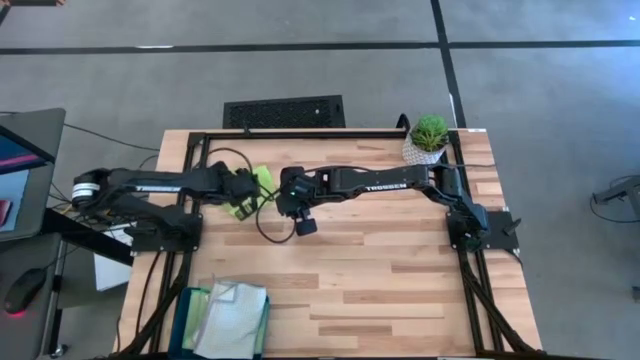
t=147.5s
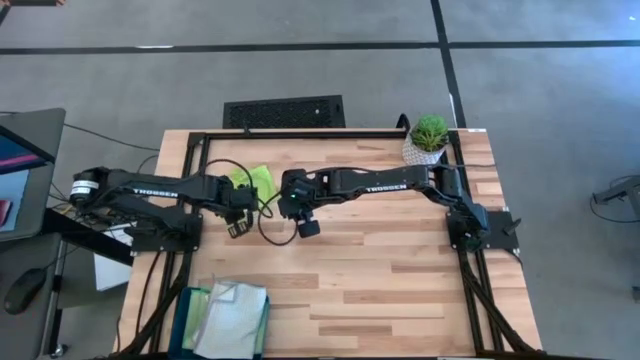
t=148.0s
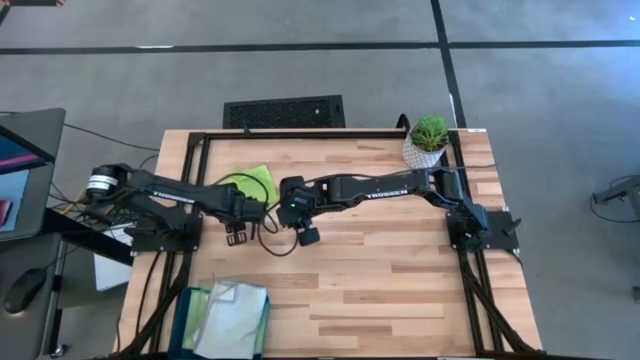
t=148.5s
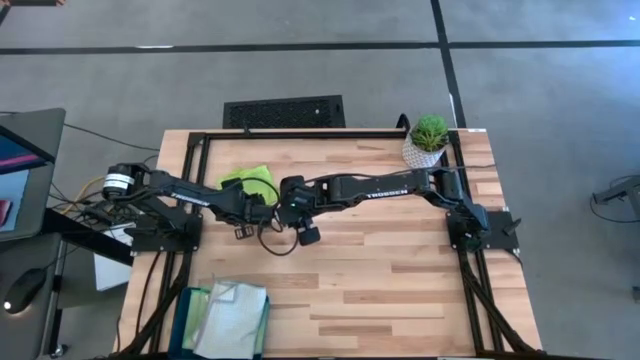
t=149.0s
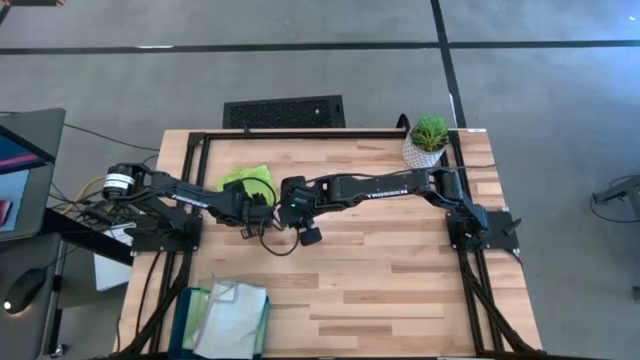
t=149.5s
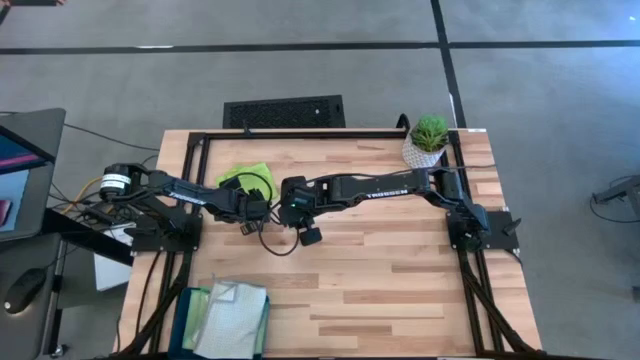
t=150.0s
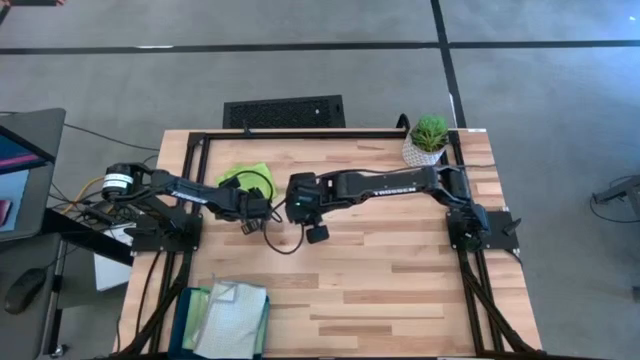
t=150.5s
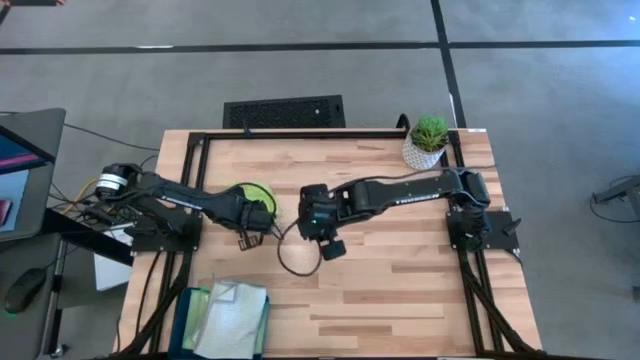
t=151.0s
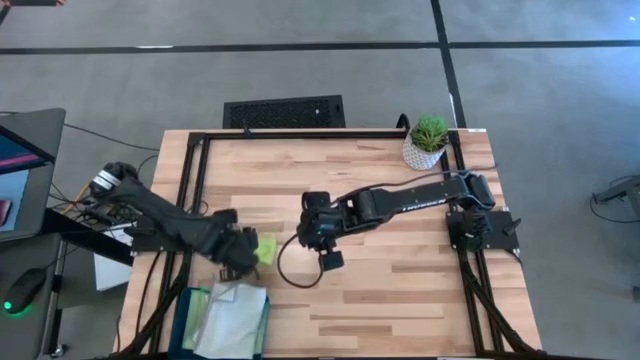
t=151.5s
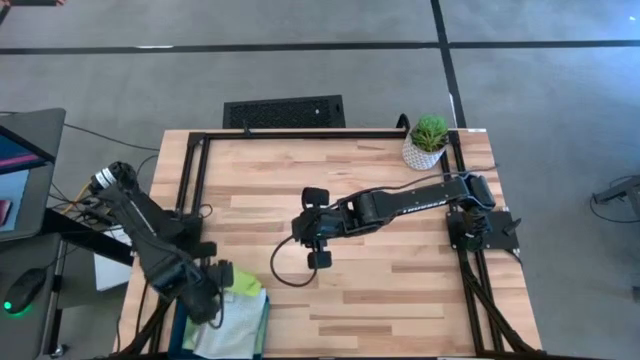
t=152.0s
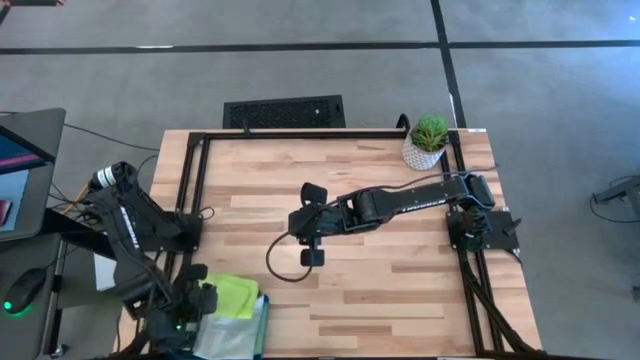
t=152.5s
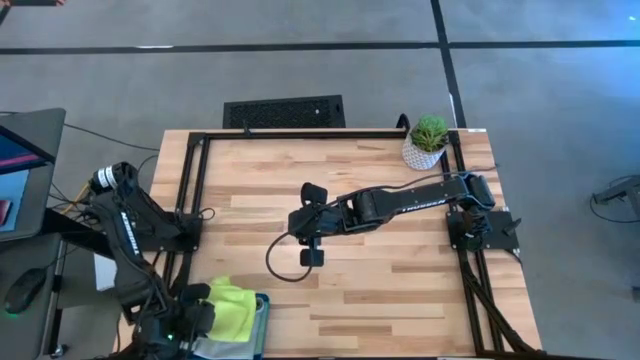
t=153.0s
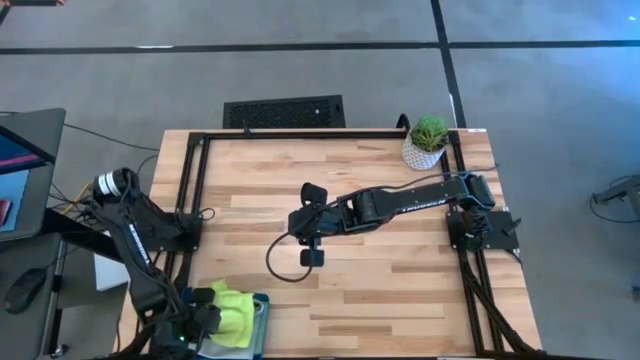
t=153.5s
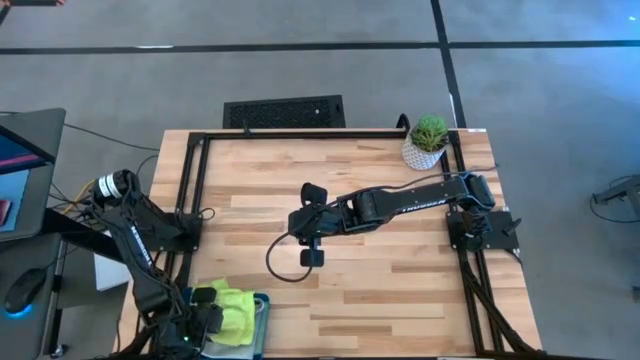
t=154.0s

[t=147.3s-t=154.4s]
Task: Fold microfiber towels
Put the folded green microfiber cloth into the blue bin

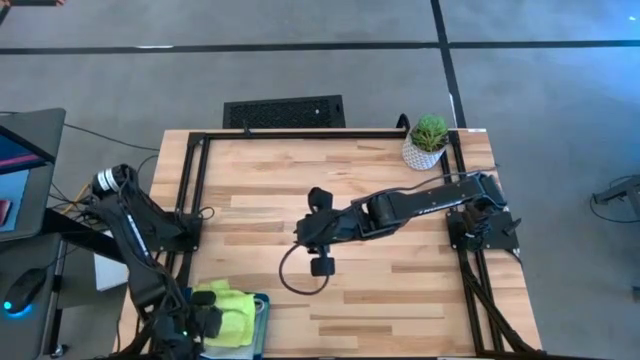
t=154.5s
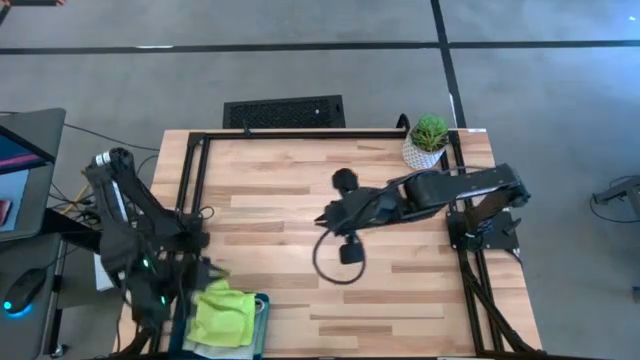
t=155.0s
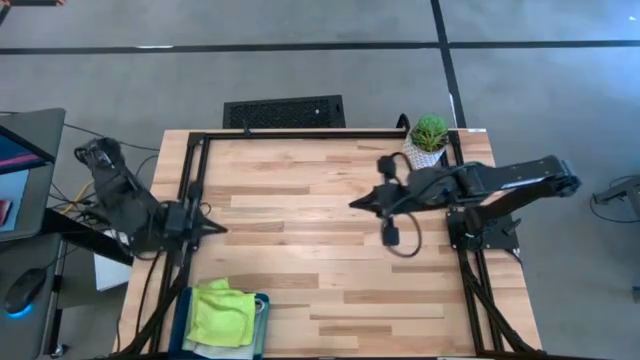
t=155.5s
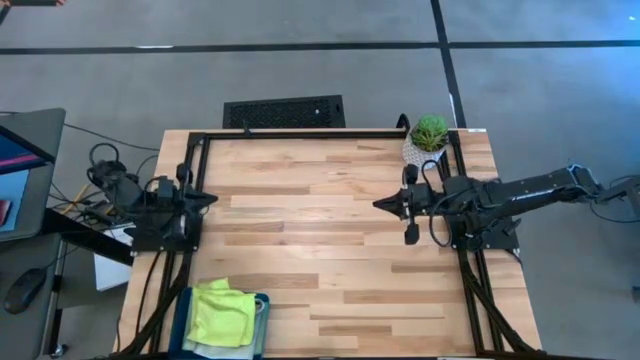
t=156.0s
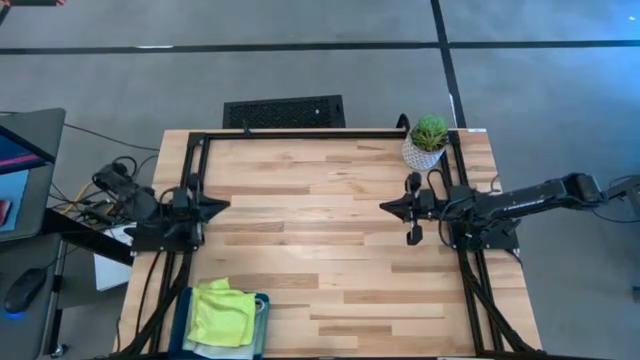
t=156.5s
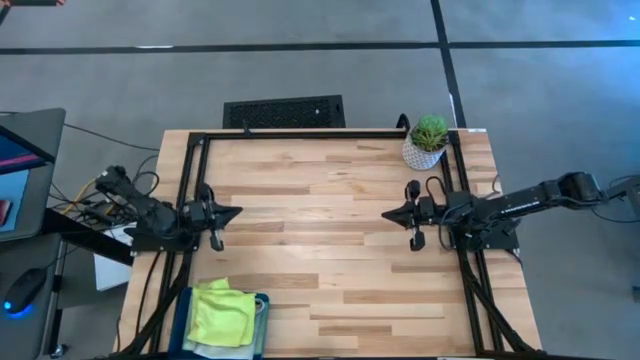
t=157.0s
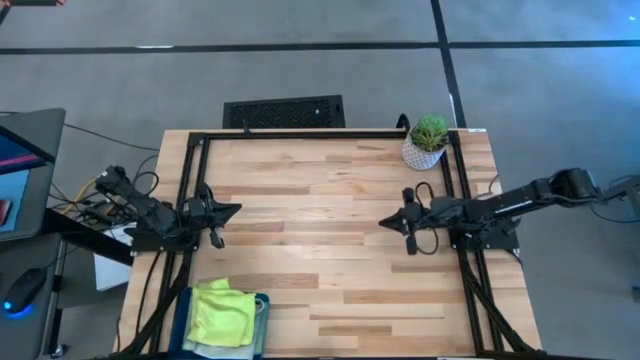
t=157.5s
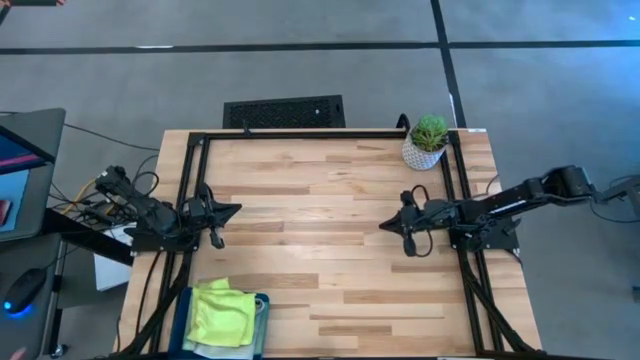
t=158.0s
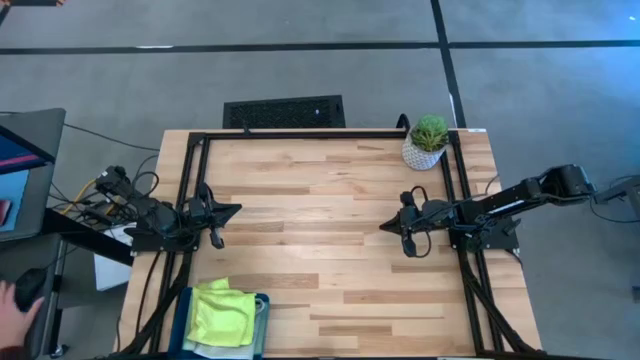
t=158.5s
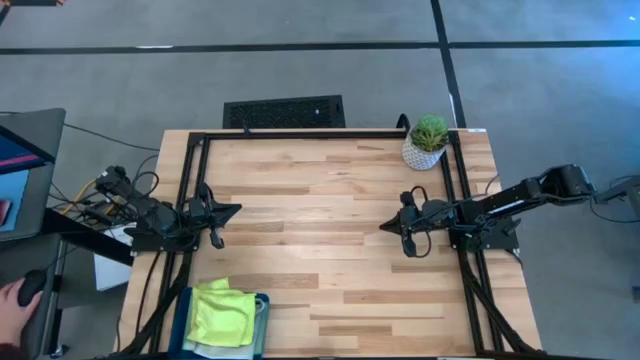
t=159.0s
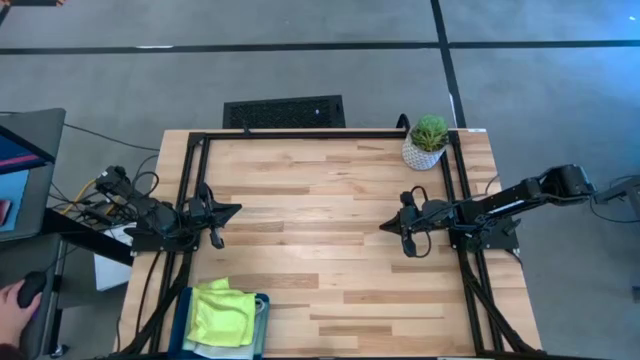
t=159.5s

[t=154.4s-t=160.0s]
Return to Home Position

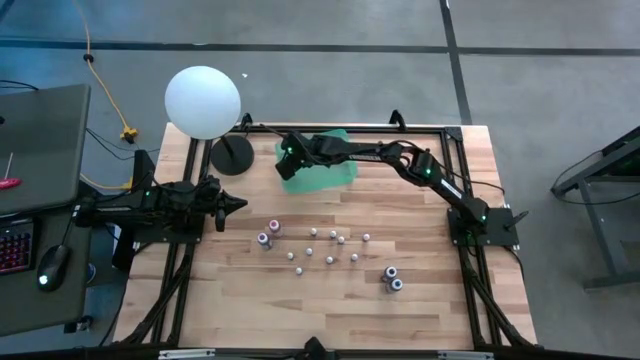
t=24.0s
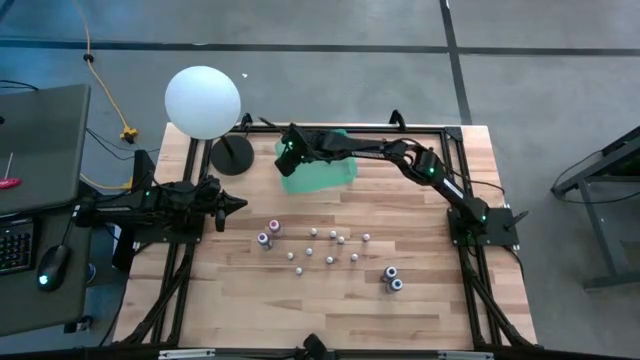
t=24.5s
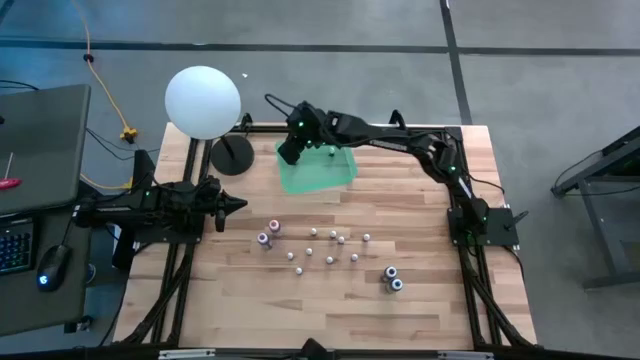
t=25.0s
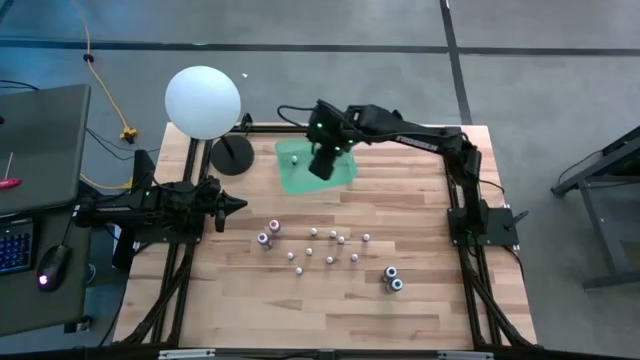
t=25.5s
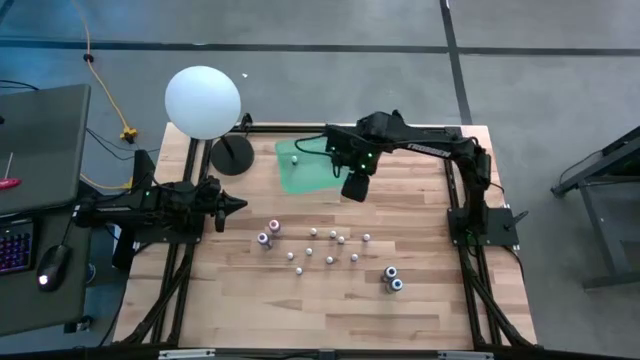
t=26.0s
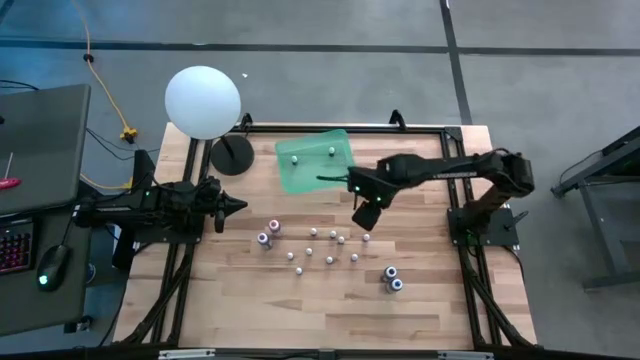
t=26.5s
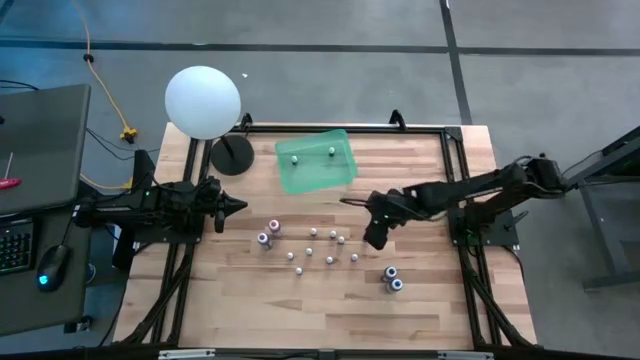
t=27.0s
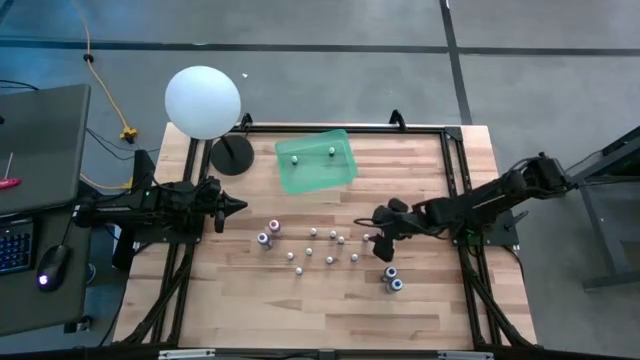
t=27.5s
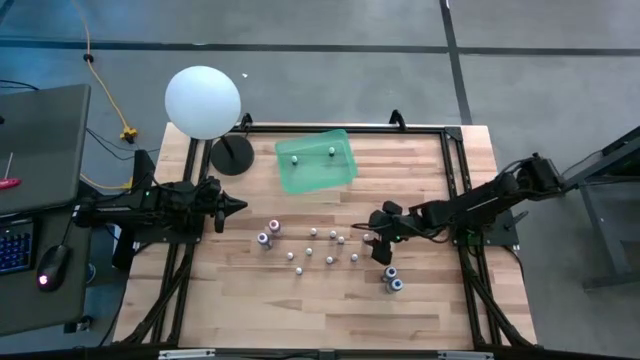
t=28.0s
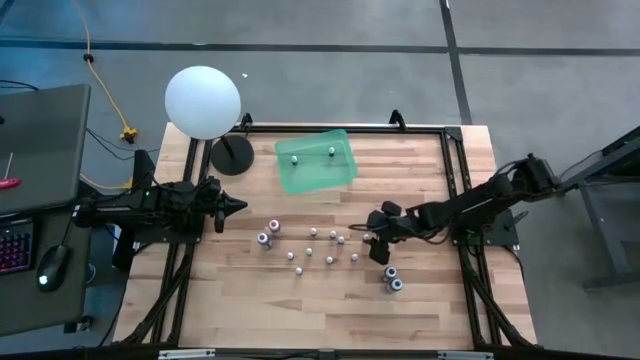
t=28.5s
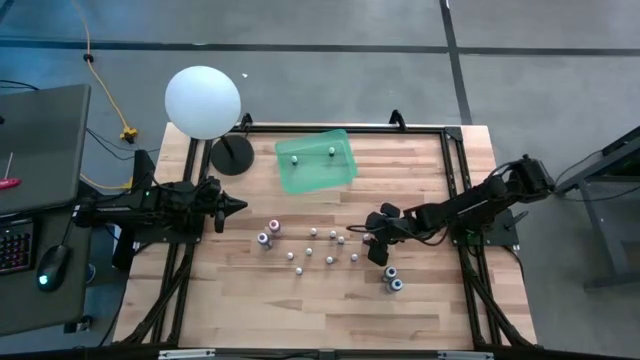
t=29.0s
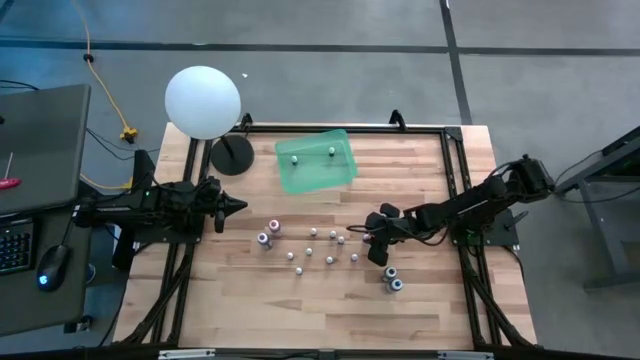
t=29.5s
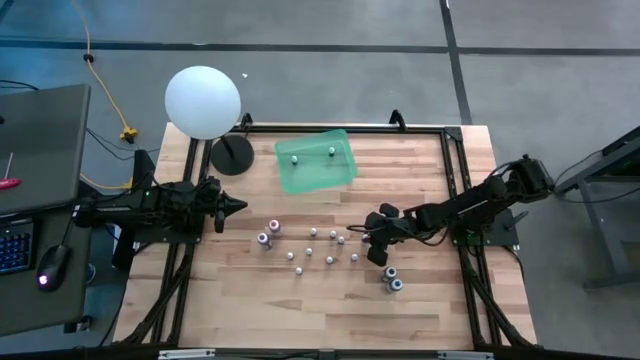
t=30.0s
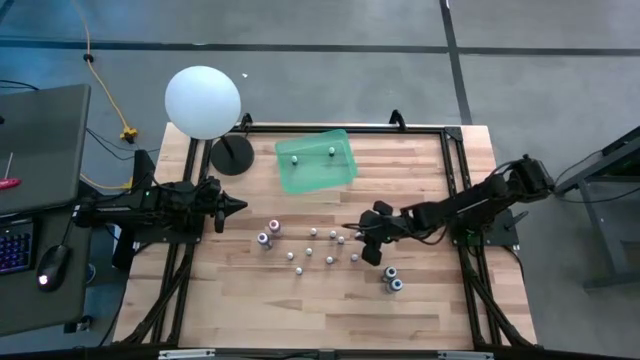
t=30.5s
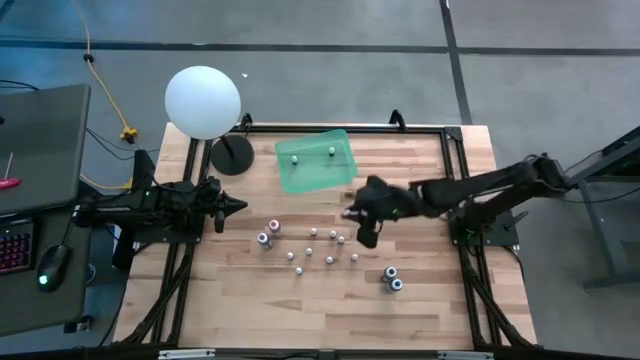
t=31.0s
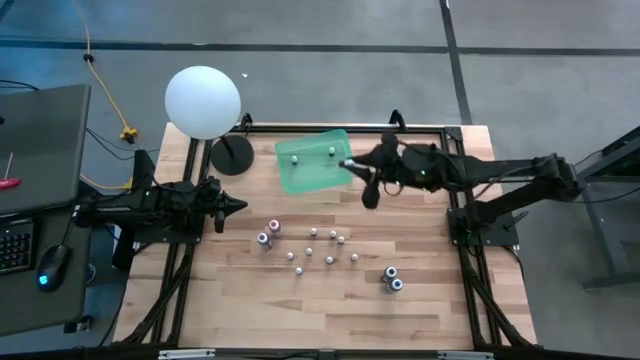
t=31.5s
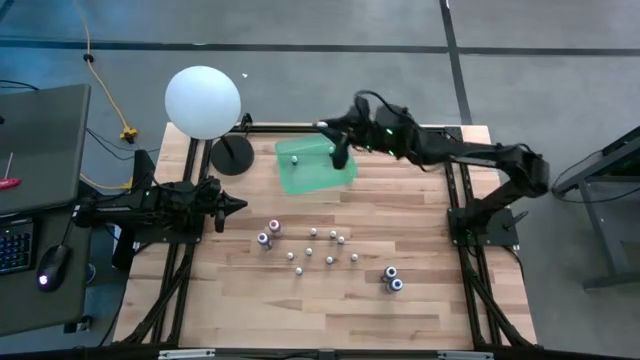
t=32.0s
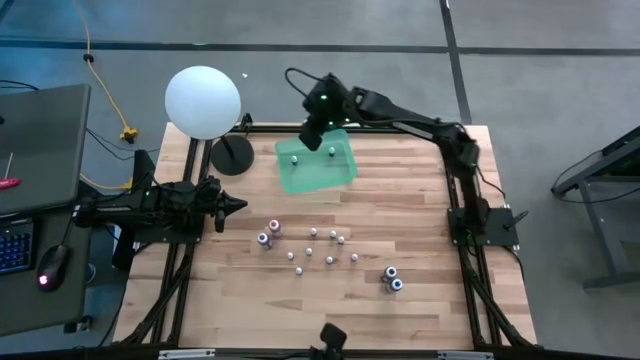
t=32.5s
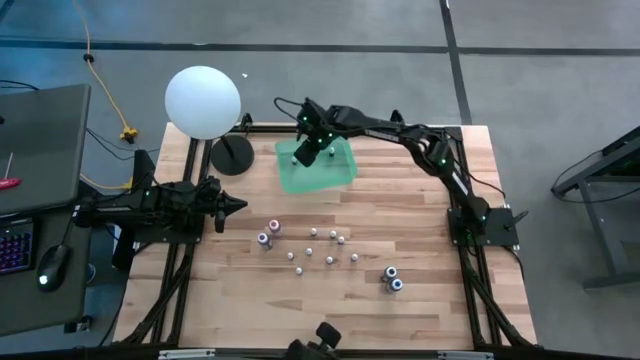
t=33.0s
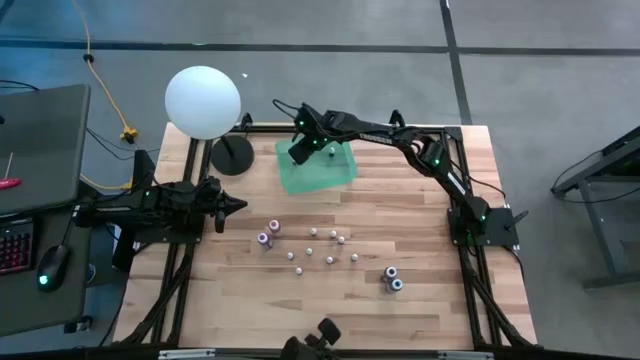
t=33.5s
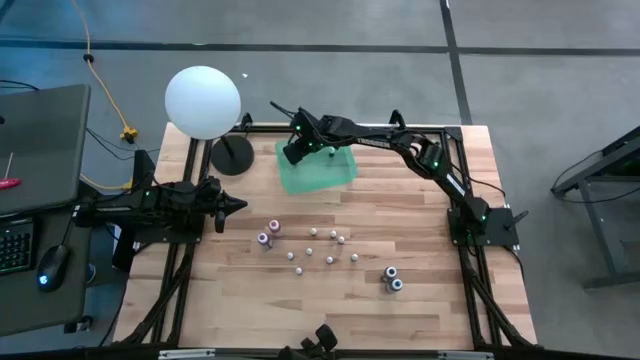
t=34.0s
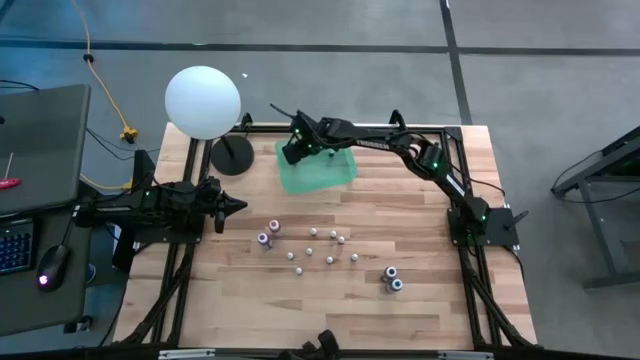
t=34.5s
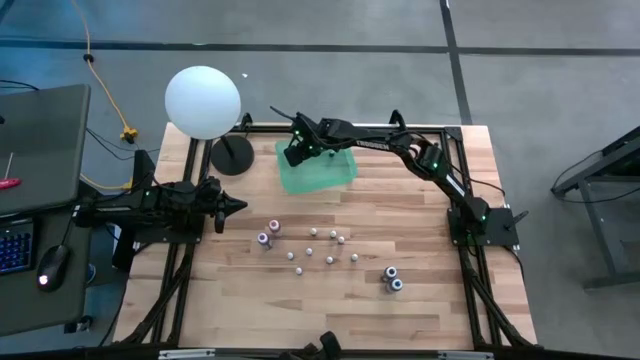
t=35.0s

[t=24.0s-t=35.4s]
Task: Pick & Place food coloring
Put the small orange dye bottle in the green bin
